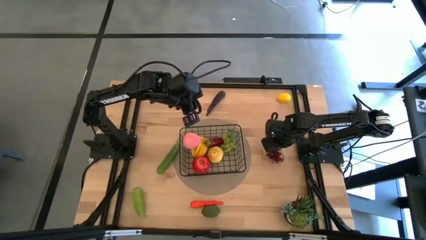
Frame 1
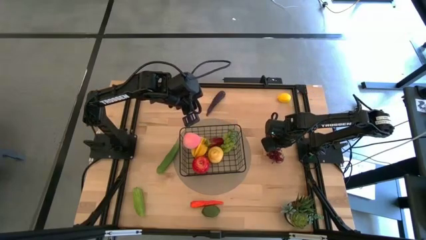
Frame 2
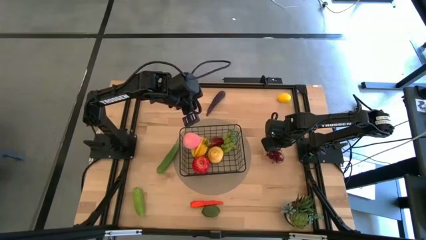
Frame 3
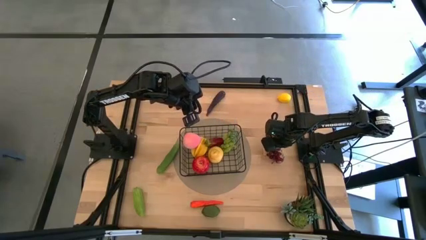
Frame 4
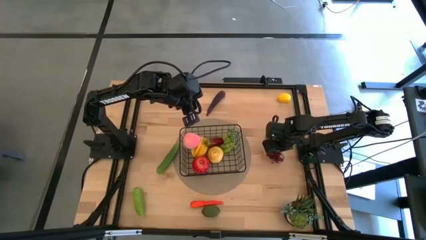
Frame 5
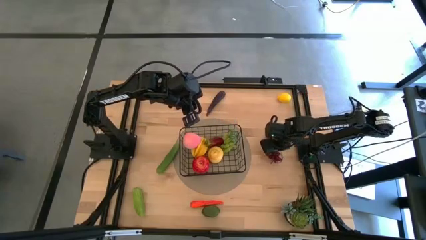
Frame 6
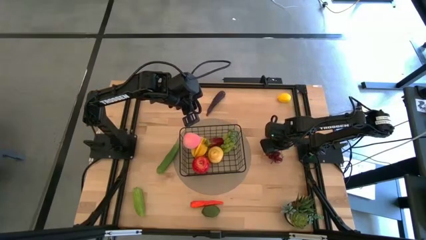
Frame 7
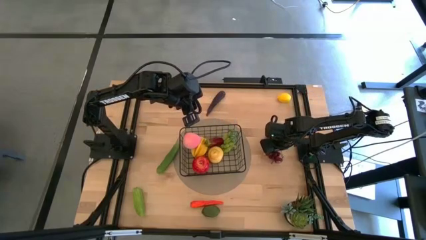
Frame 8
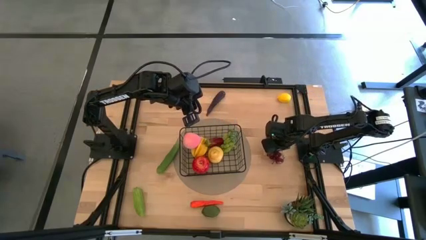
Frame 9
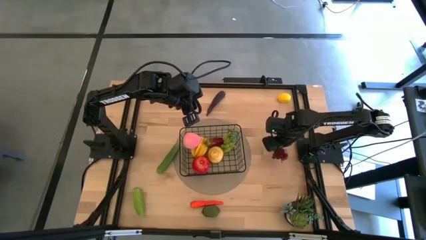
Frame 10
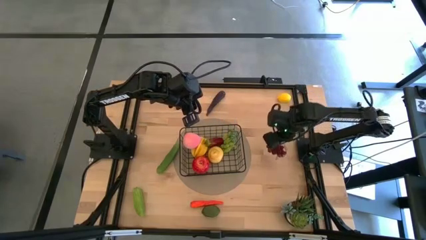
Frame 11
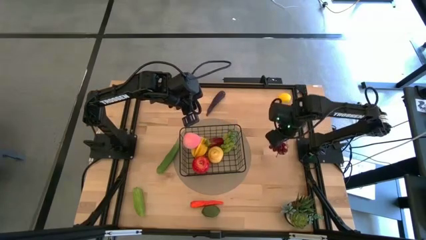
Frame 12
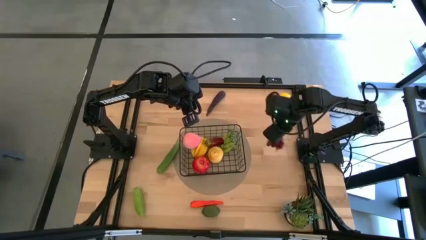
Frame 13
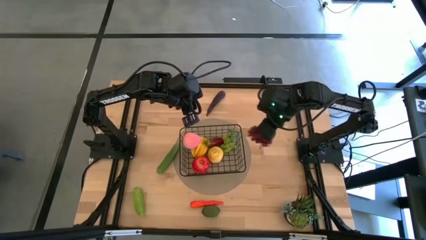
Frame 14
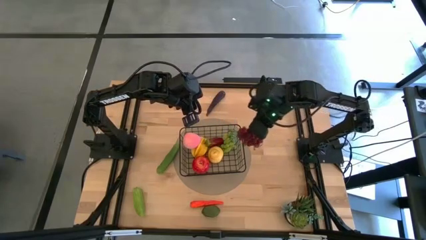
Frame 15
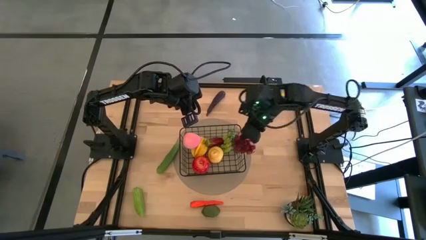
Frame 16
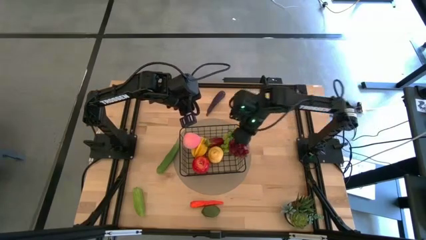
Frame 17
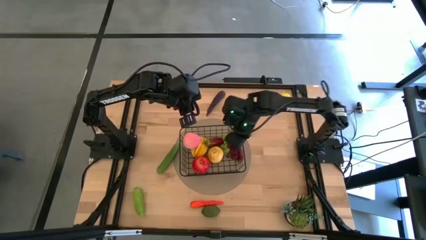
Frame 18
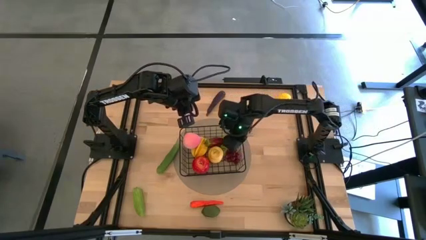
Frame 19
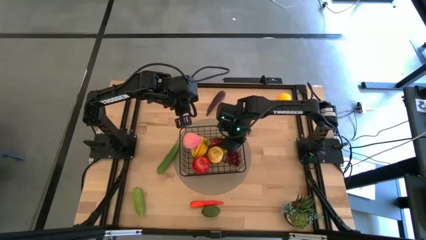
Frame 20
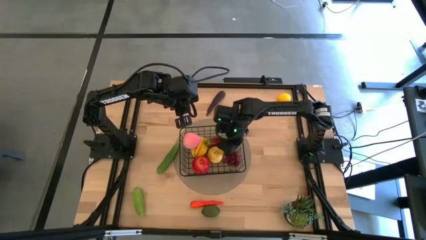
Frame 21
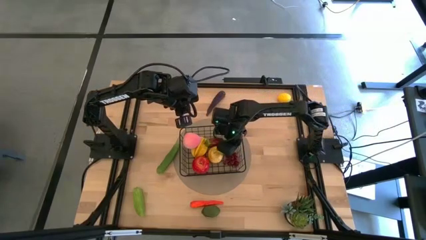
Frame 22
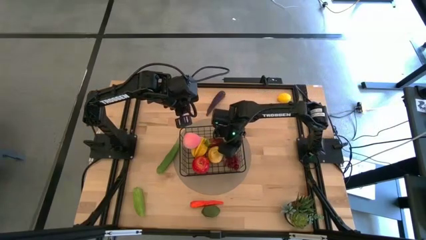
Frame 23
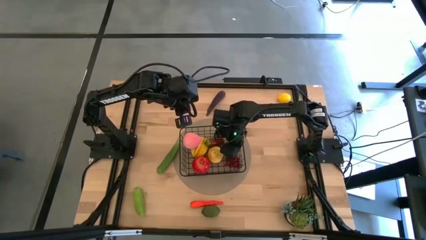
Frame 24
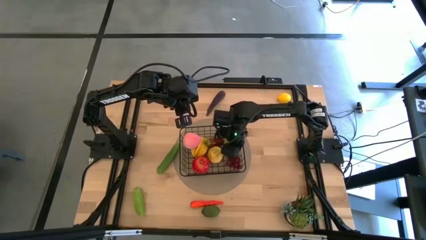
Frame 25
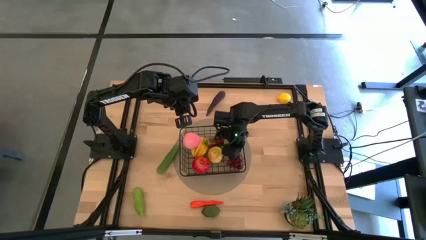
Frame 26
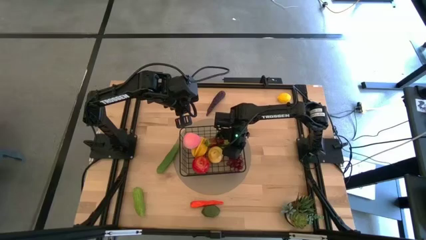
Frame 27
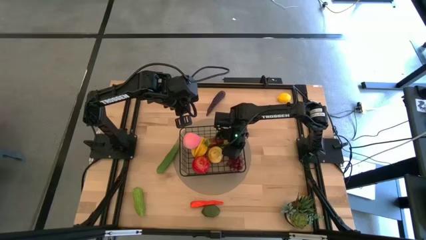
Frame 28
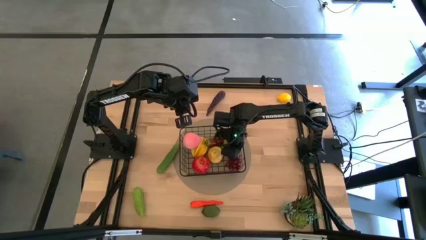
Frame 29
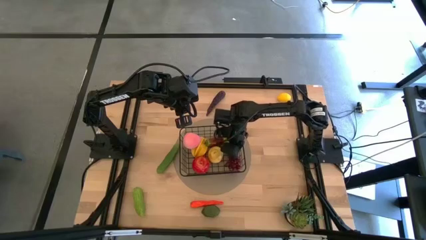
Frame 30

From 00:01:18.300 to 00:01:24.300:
Task: Build produce basket
Put the red grapes into the black wire basket

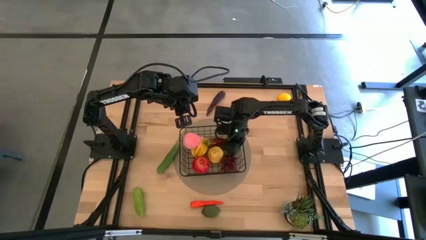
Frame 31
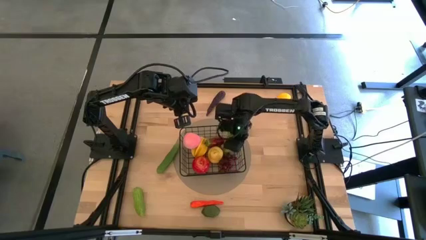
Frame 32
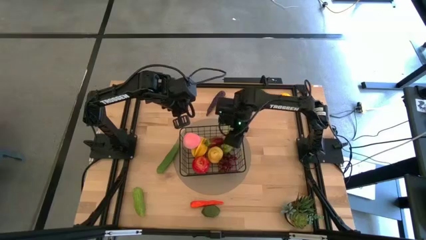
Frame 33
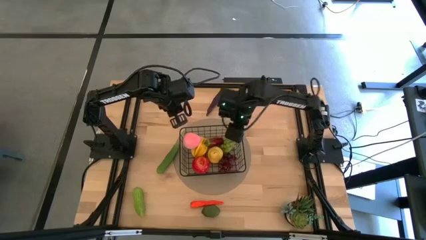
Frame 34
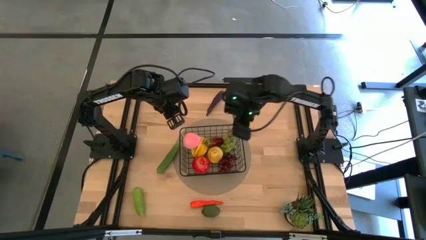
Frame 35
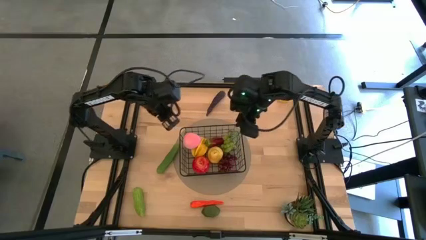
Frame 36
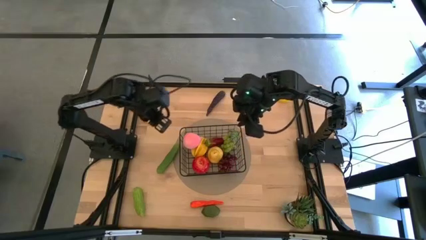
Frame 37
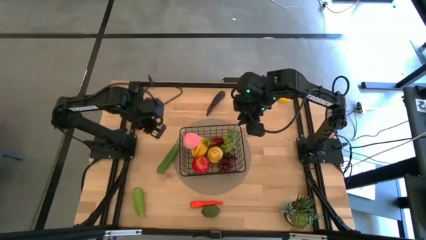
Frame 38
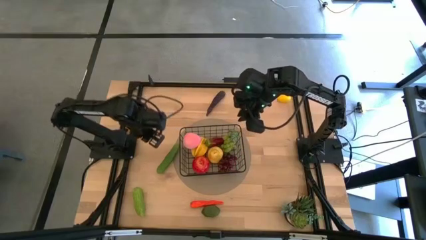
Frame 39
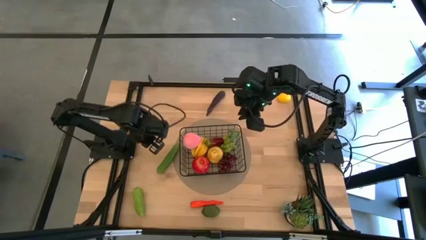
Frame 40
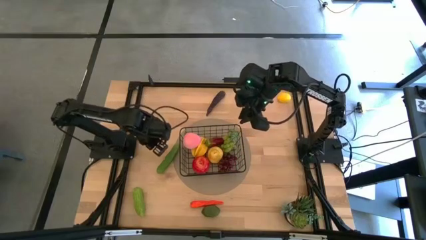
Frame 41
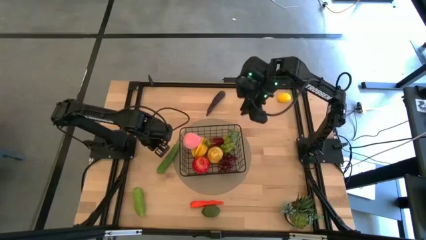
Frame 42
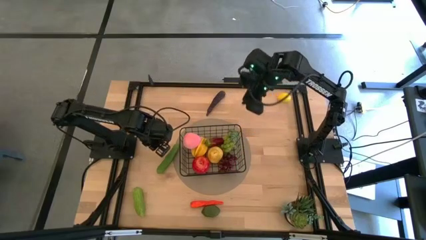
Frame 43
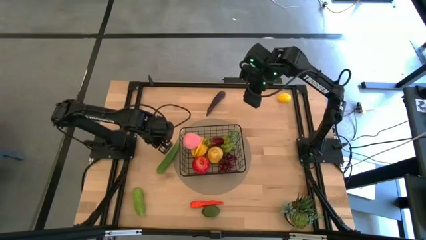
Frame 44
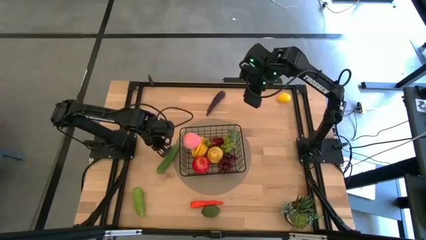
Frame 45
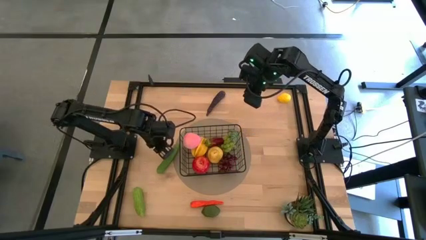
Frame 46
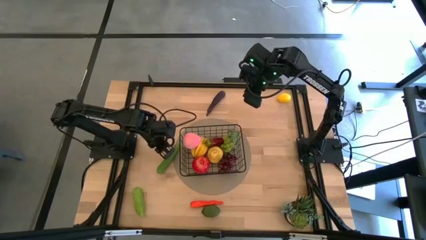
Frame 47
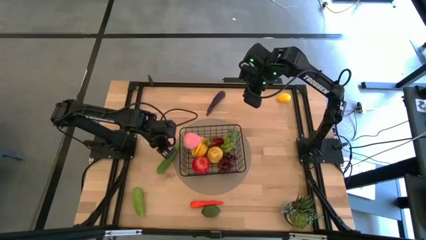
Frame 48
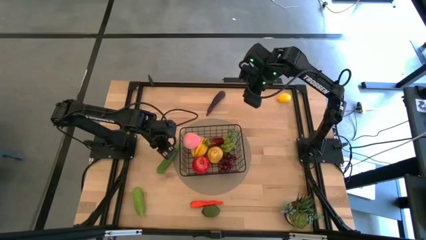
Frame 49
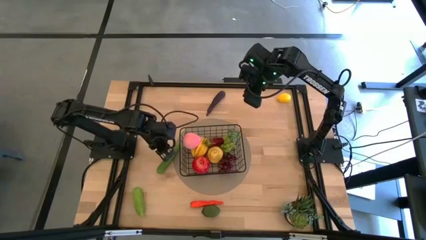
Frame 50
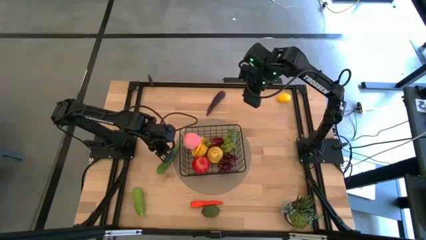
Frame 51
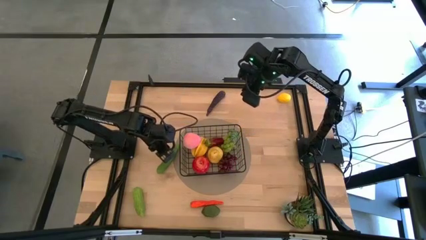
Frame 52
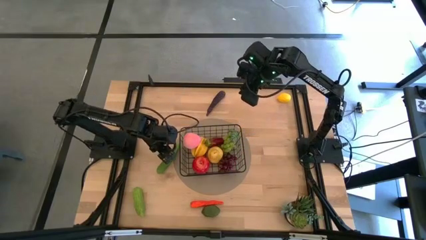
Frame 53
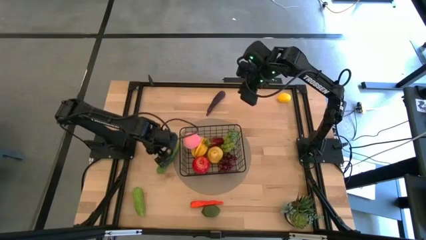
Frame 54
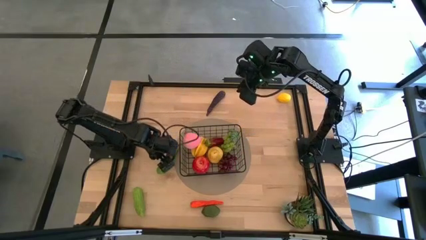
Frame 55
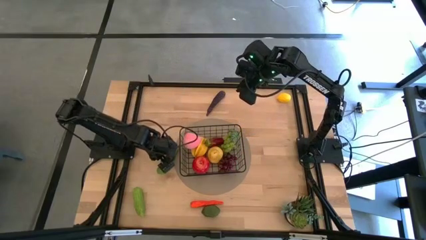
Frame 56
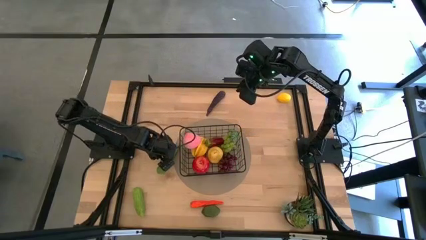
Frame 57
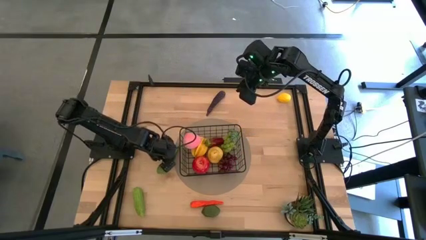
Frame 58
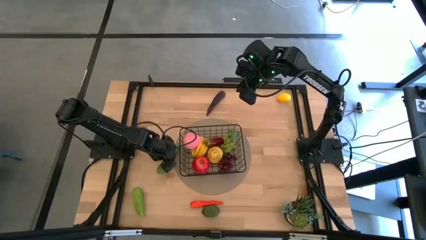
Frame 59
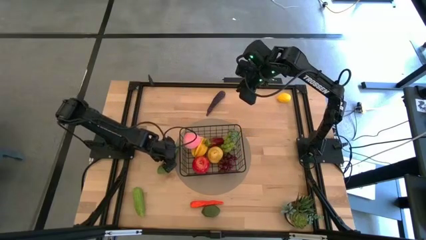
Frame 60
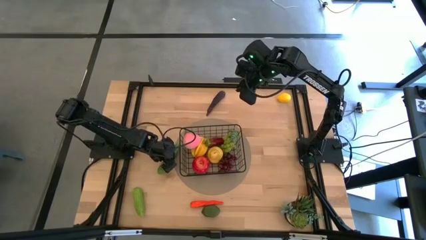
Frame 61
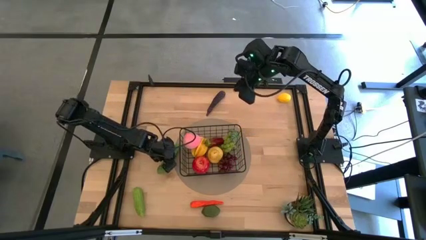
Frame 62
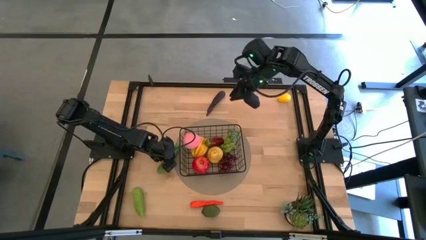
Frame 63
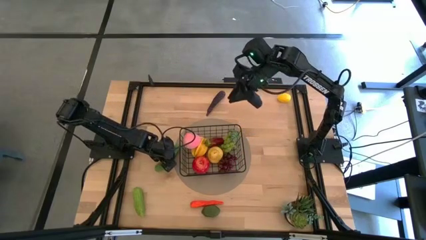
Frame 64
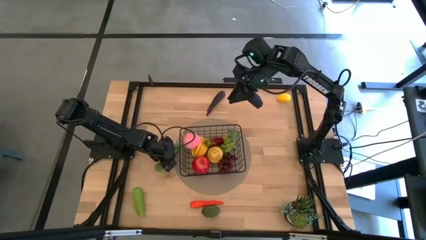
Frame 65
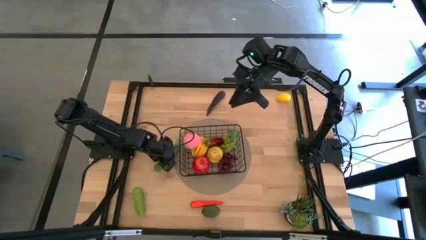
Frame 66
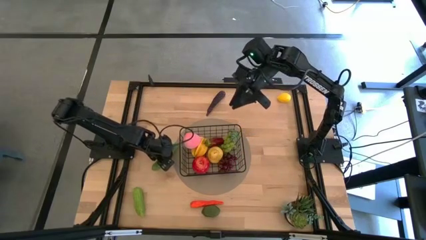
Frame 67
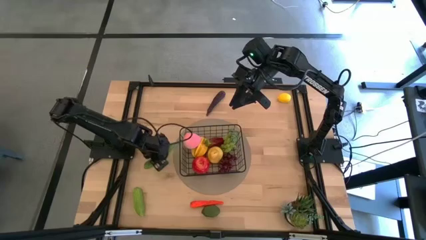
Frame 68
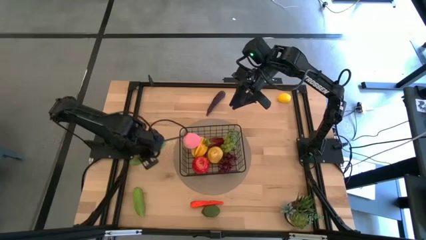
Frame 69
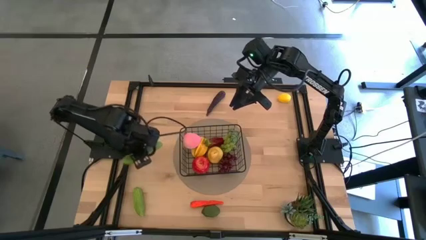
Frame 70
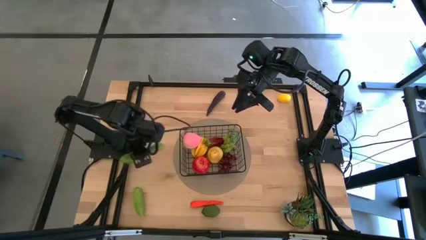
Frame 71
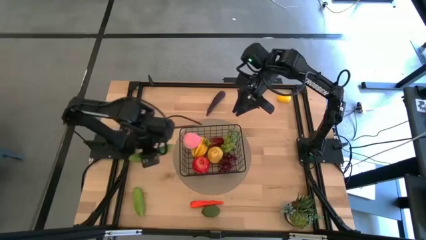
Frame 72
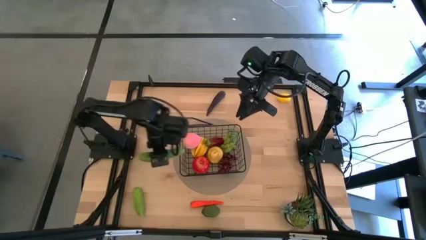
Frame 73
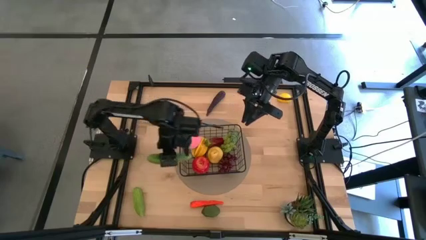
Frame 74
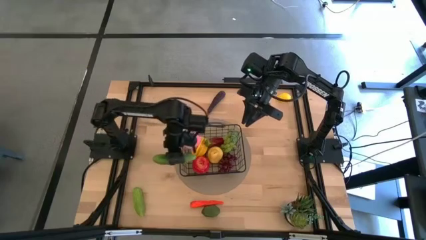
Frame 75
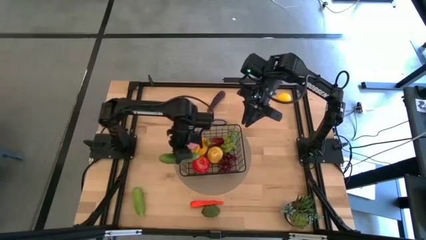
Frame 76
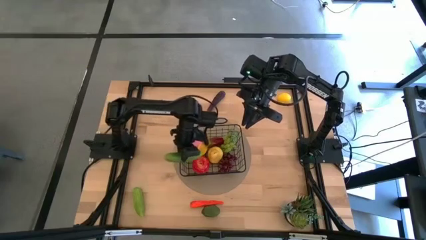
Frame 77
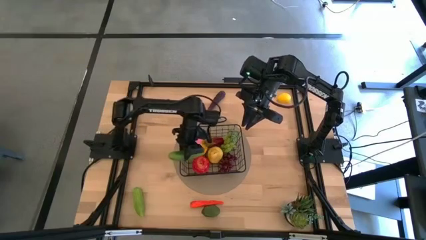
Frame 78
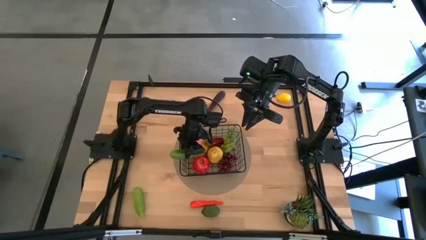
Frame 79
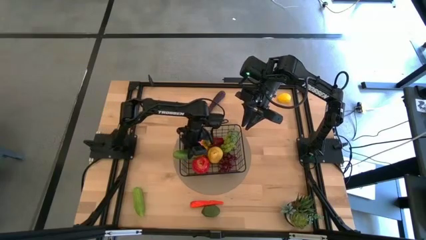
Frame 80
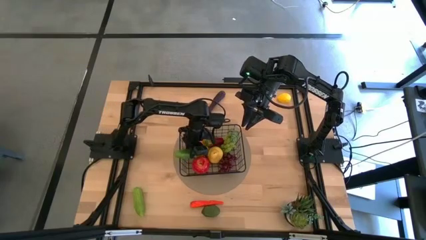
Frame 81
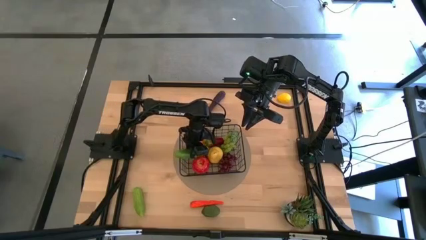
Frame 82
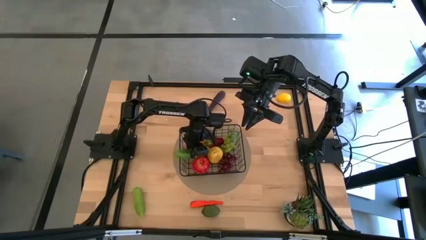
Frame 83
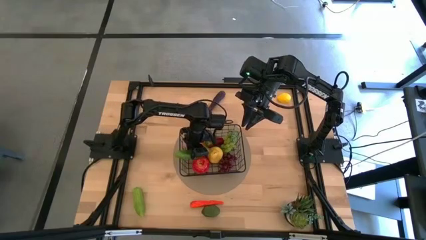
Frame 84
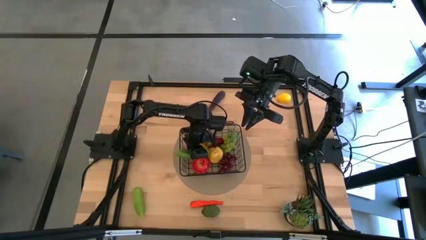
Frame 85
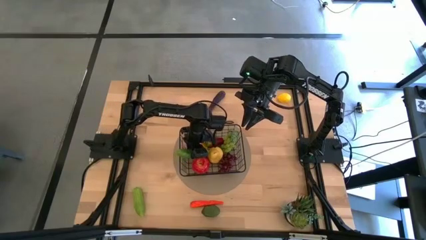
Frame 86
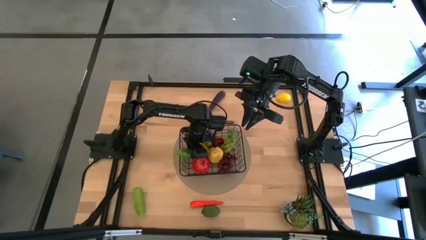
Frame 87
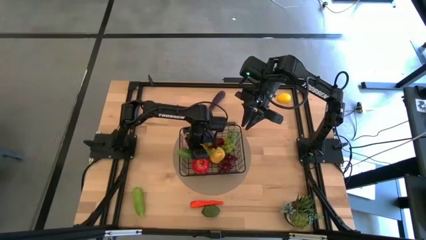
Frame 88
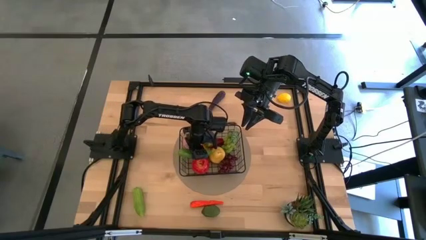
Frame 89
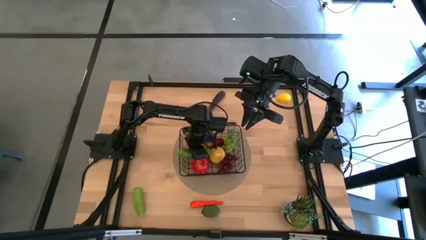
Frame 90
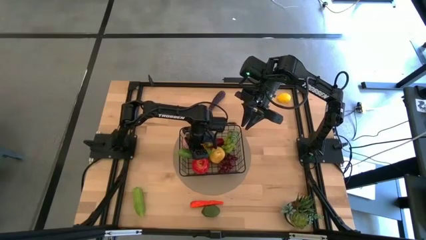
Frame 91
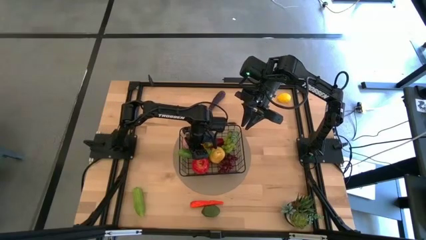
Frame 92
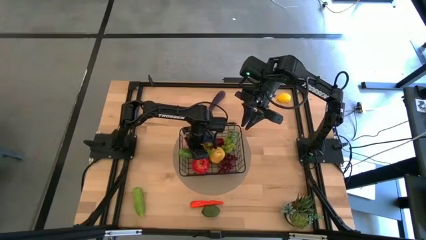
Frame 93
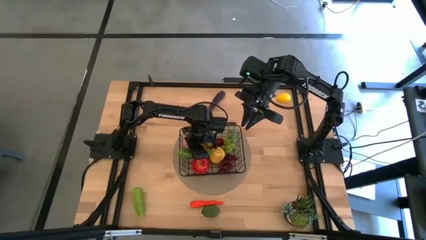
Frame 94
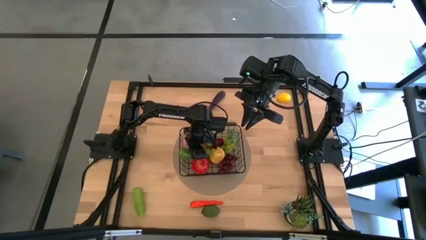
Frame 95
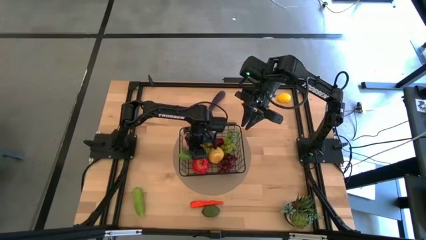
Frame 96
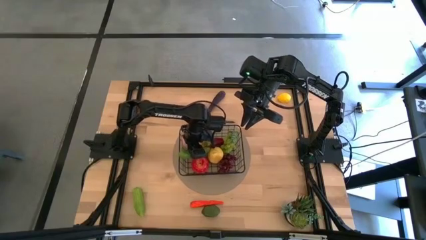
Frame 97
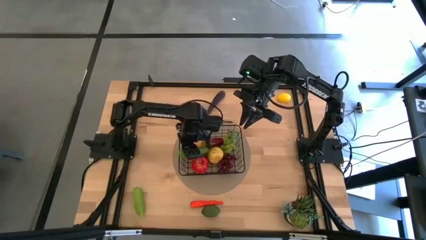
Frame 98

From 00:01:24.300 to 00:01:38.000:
Put the top green cucumber into the black wire basket
